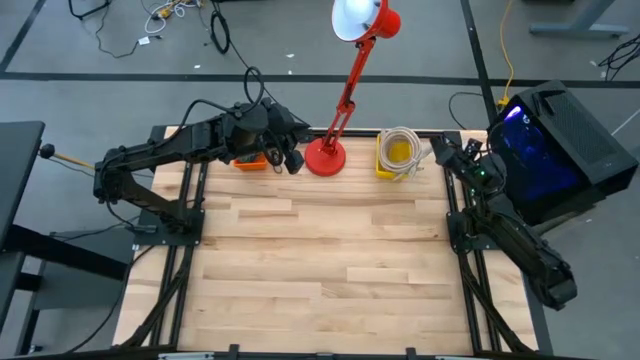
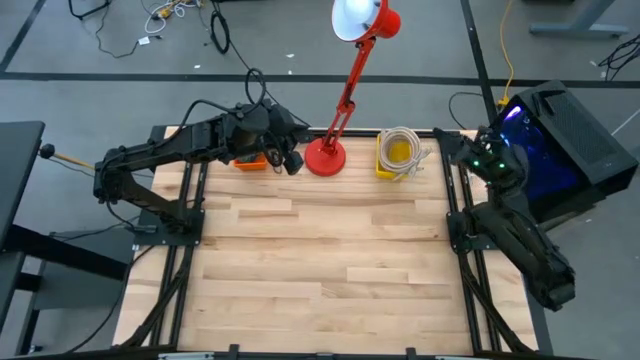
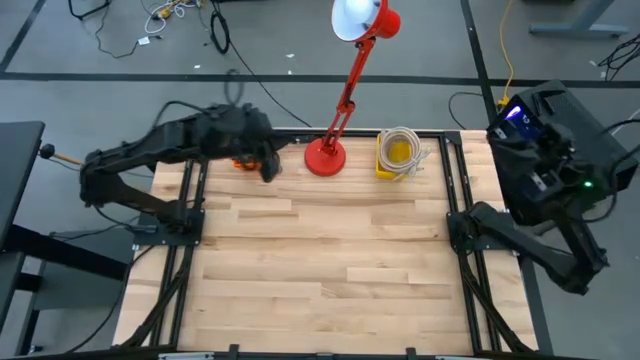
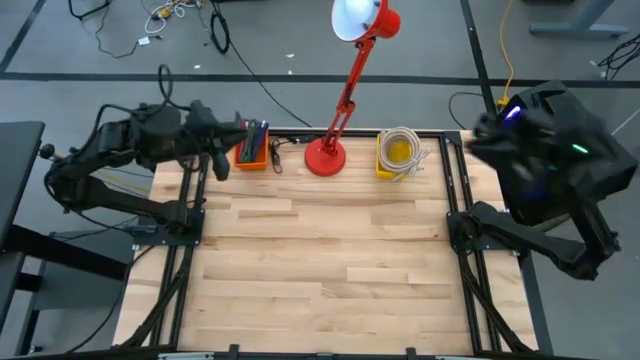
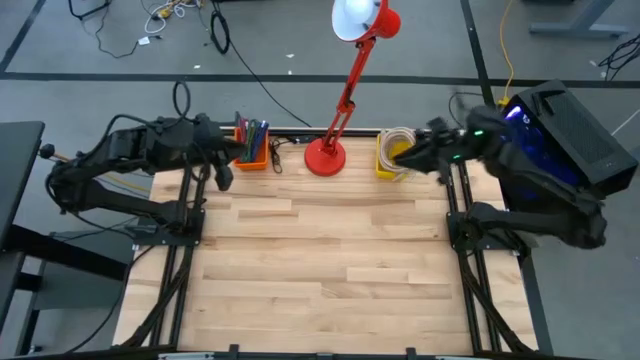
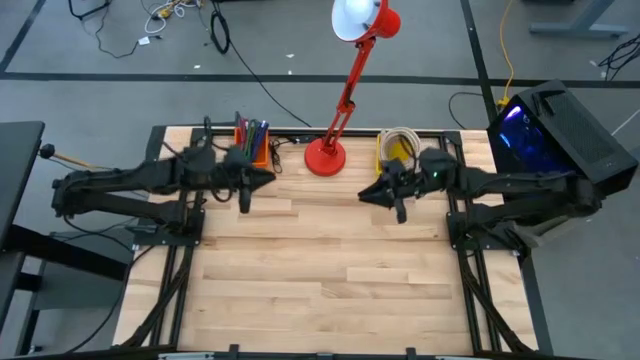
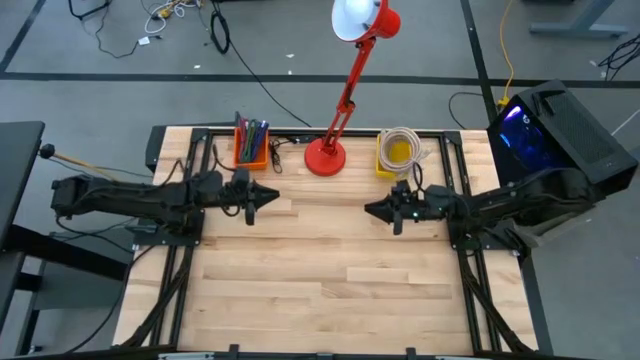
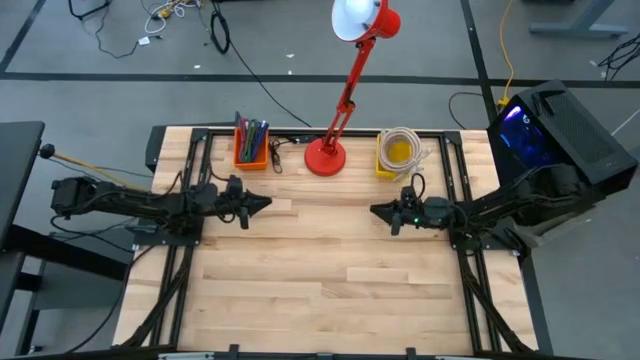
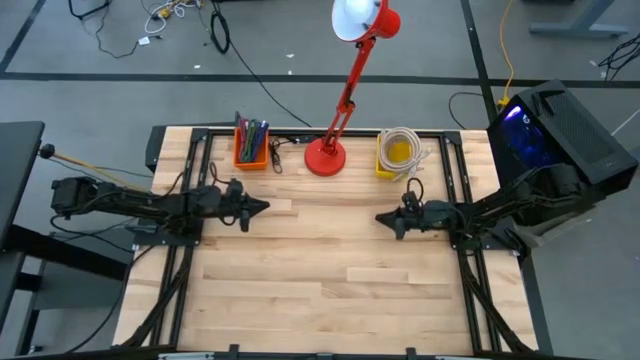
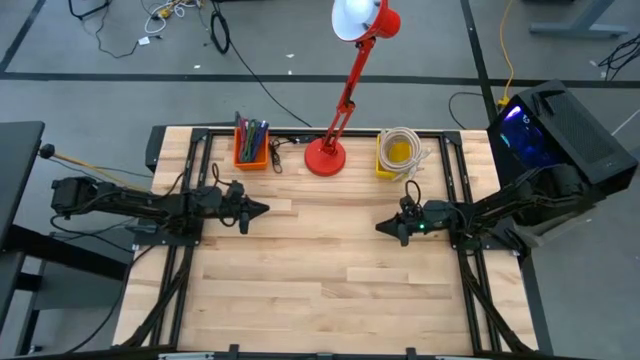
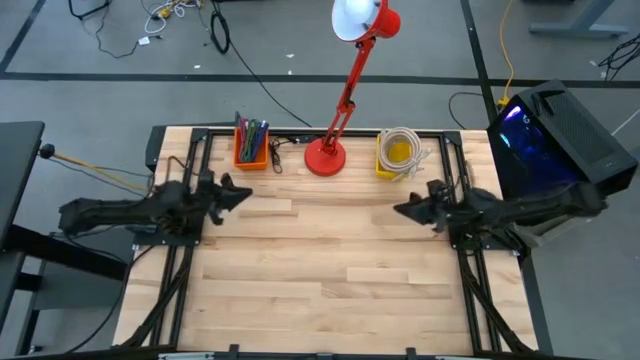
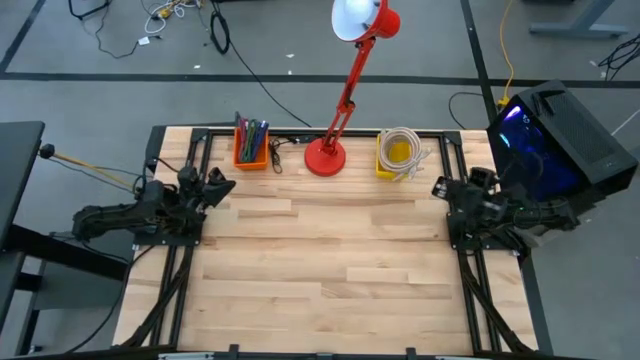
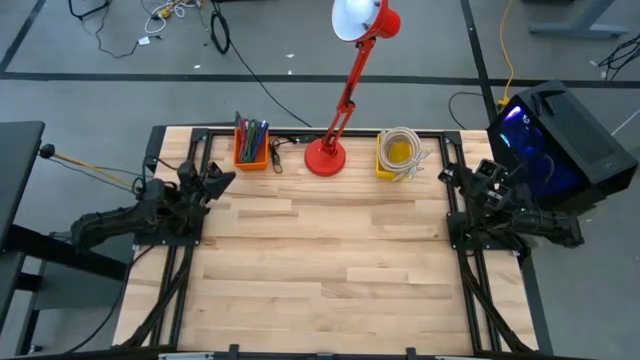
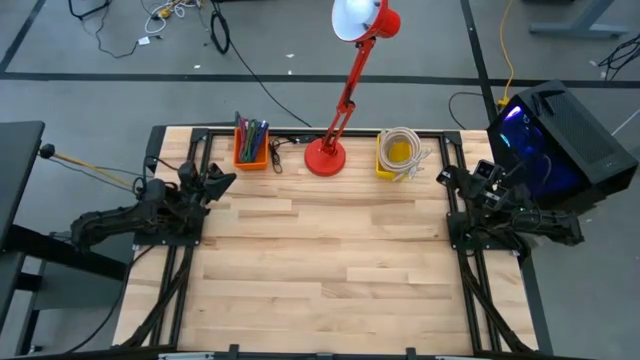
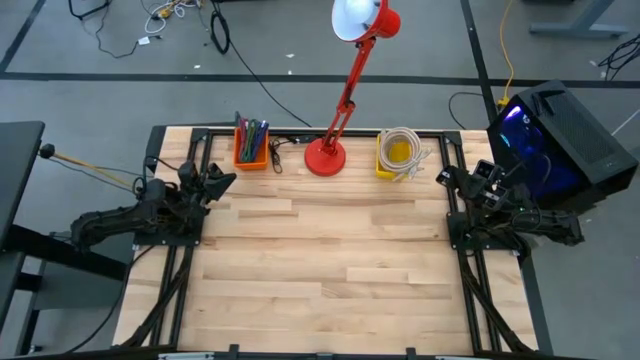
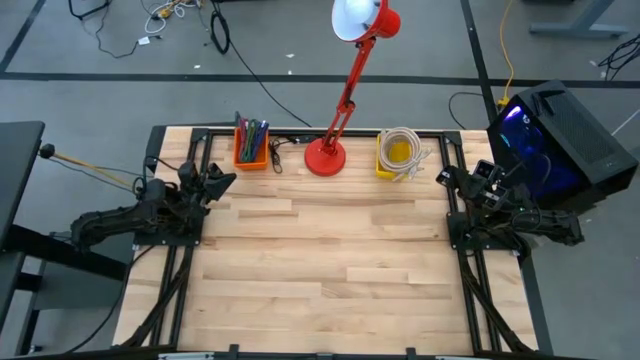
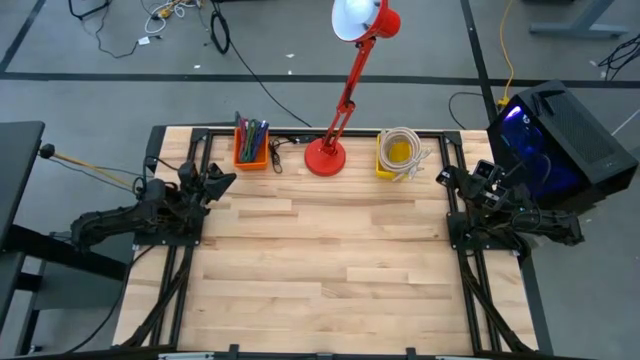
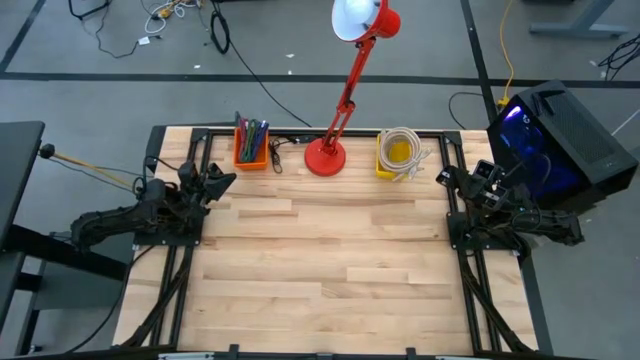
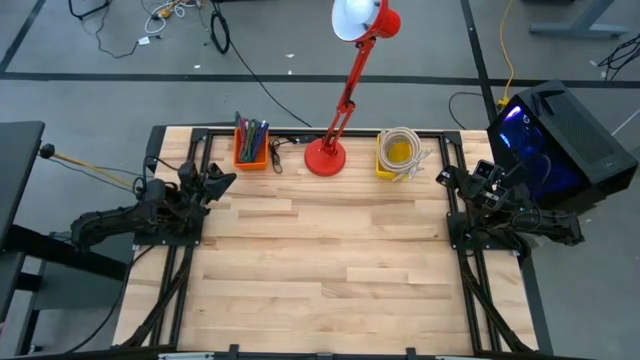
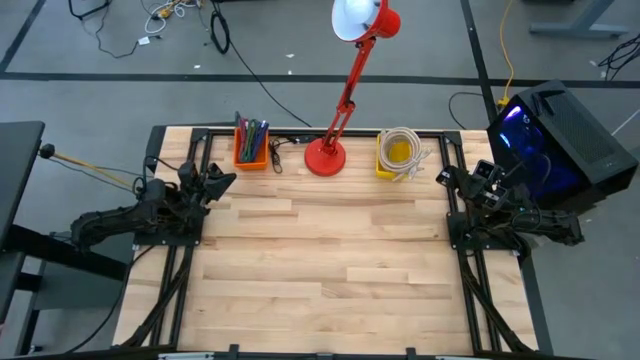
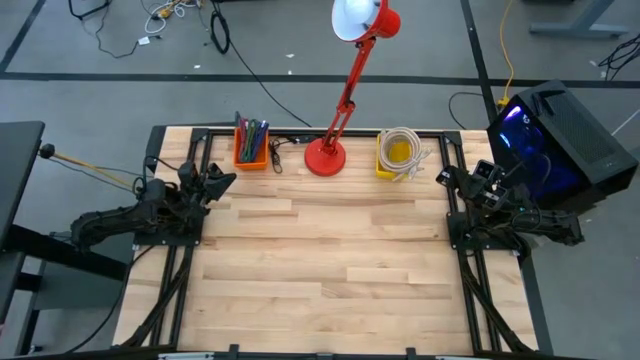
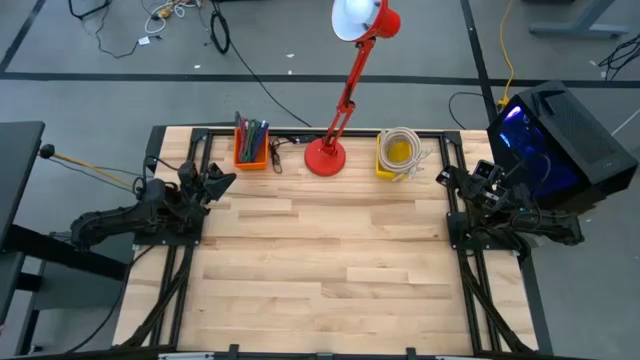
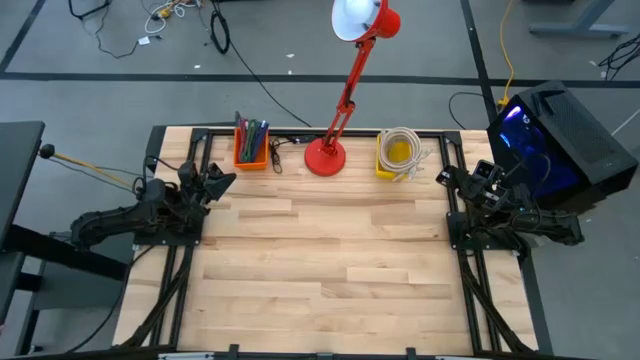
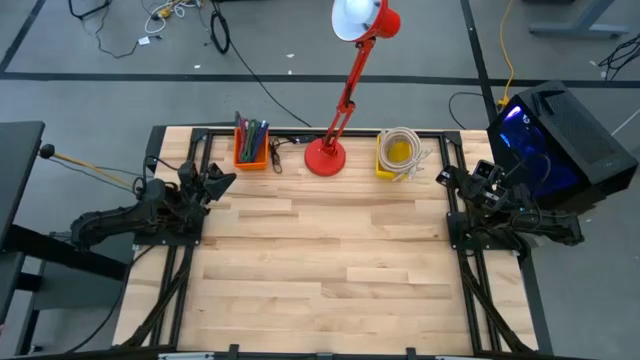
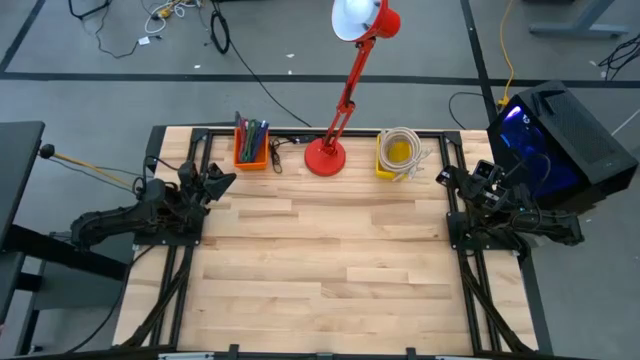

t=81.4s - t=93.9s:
Task: Pick & Place USB Port
Return to Home Position

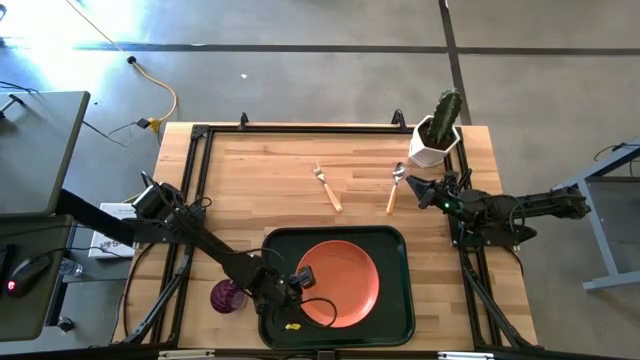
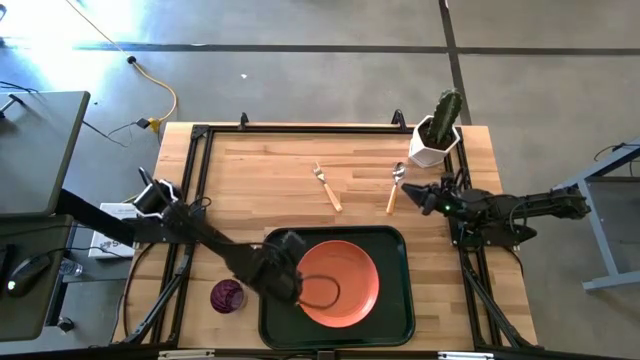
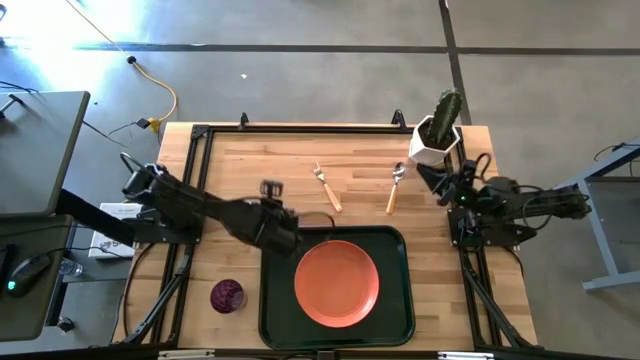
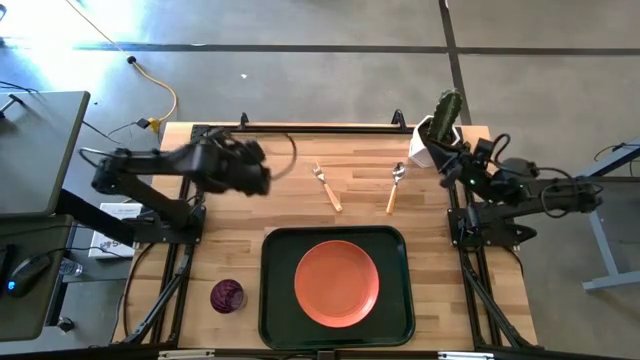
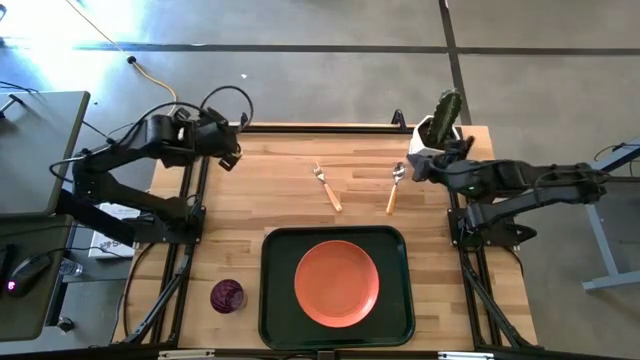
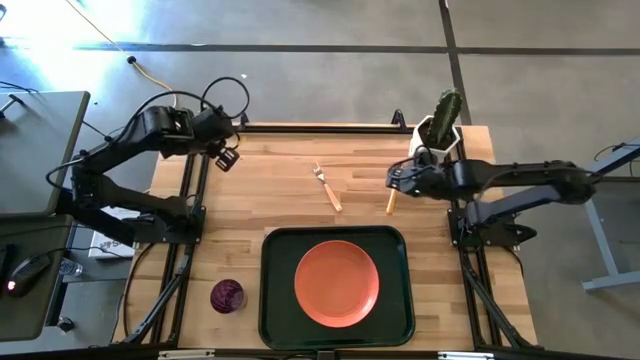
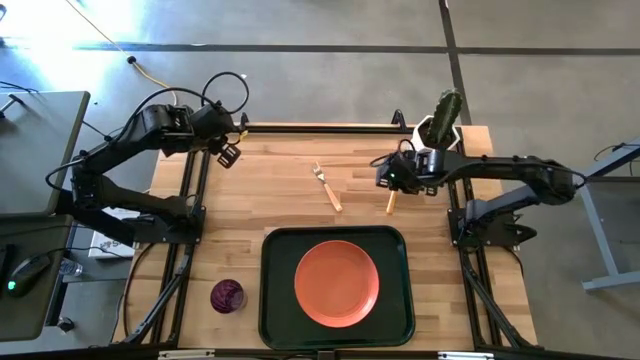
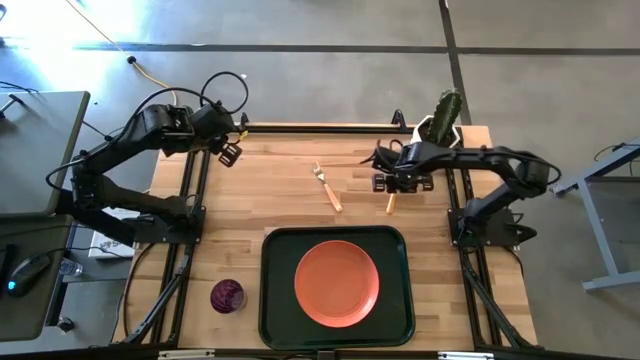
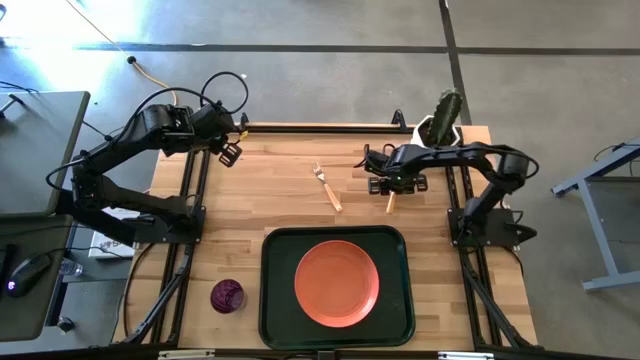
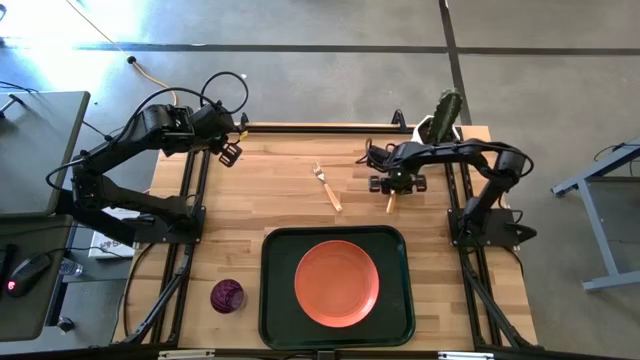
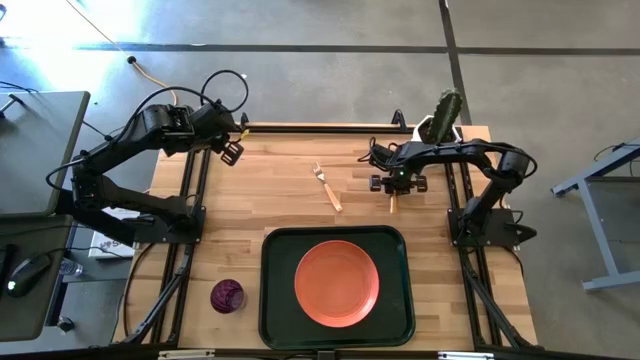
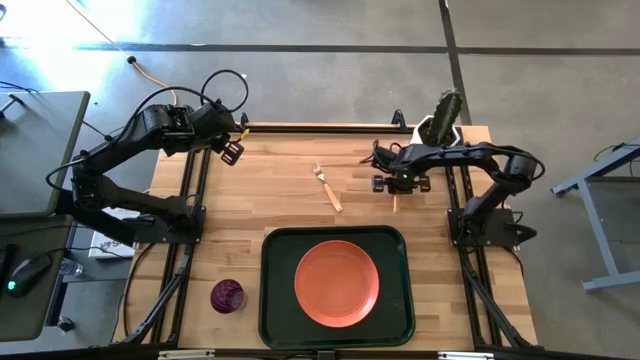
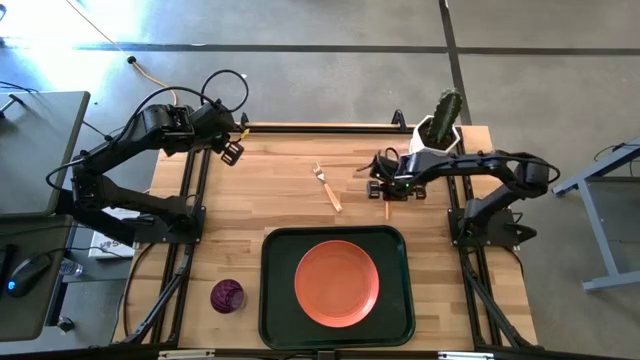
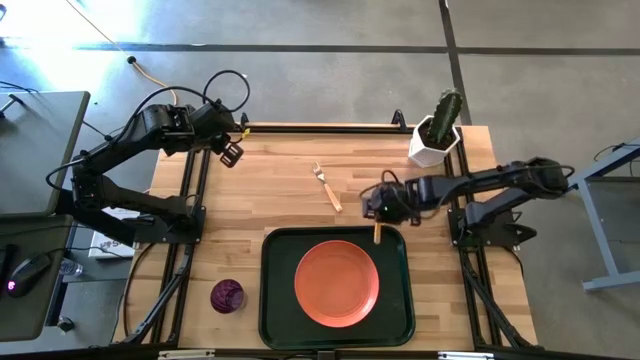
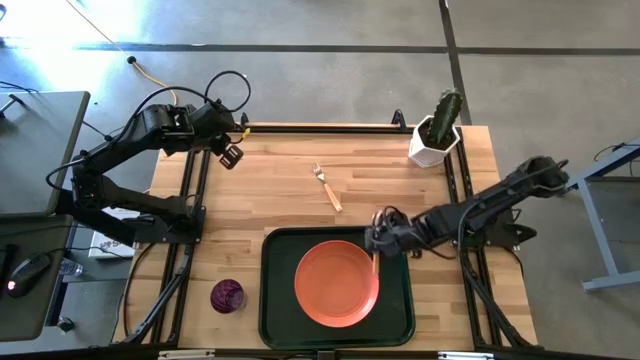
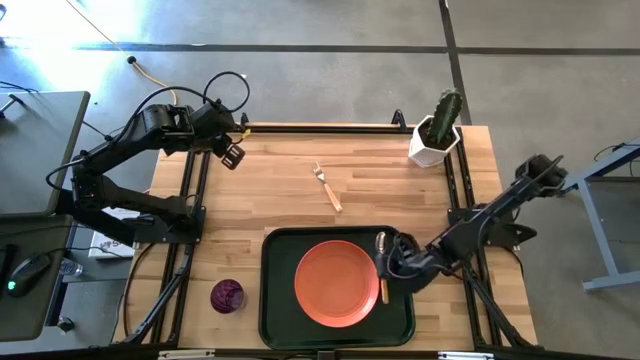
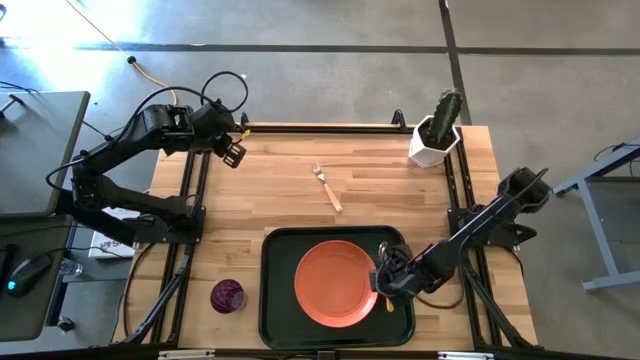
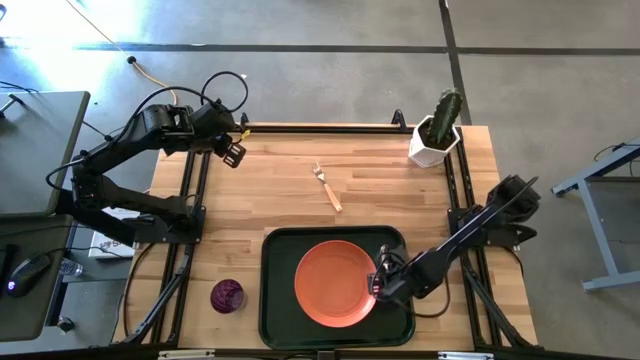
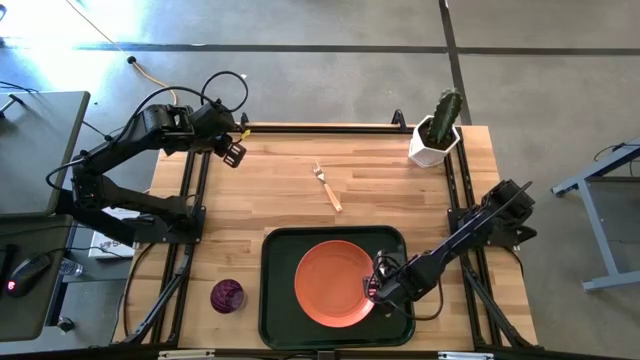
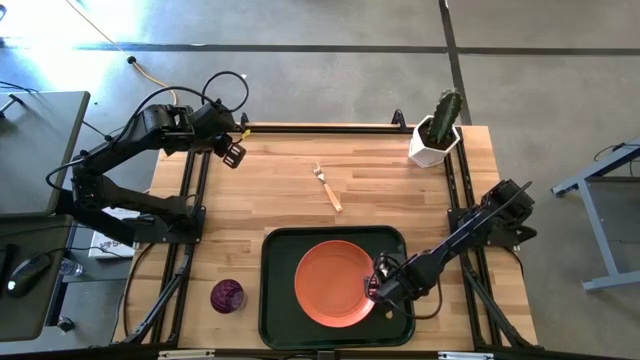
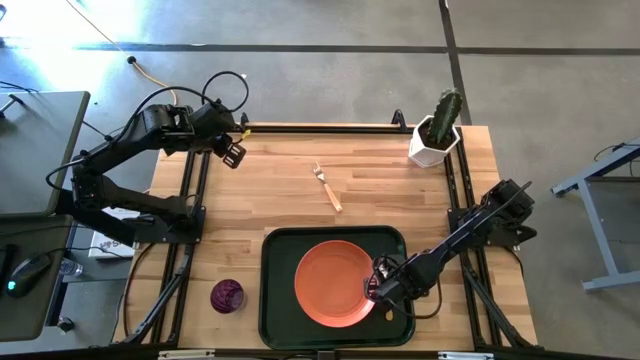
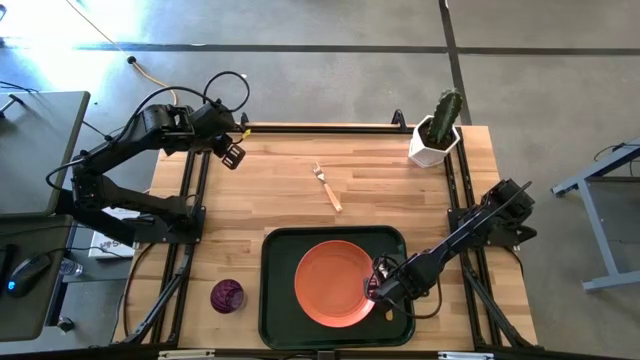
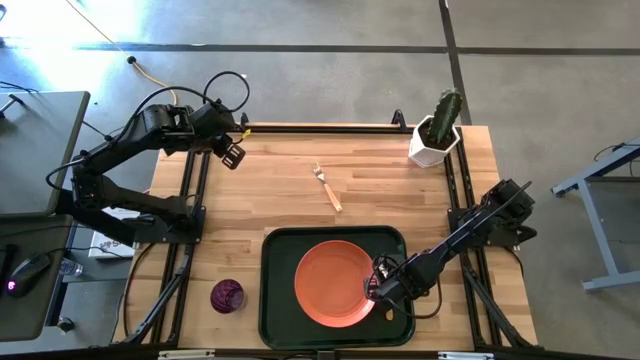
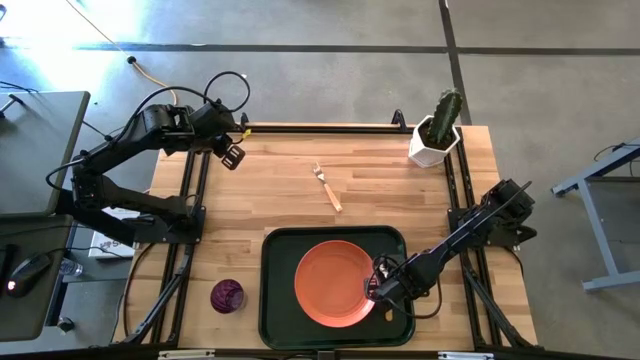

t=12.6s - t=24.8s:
Task: Pick and place plate/cup/fork/spoon on tray
Put the yellow spoon on the black tray to the right of the orange plate
